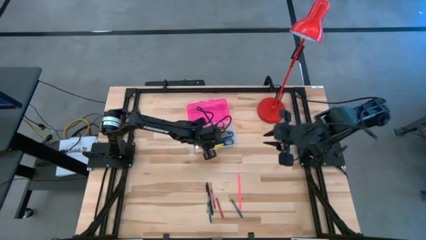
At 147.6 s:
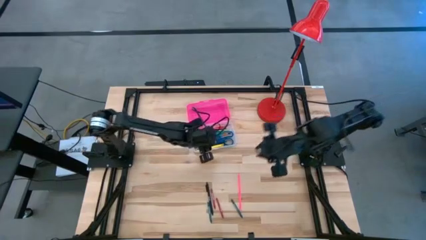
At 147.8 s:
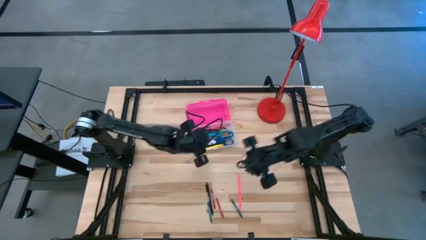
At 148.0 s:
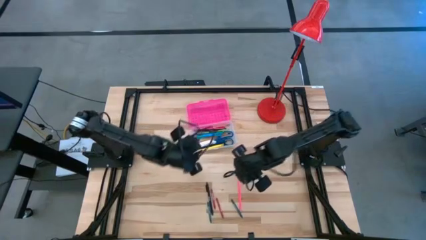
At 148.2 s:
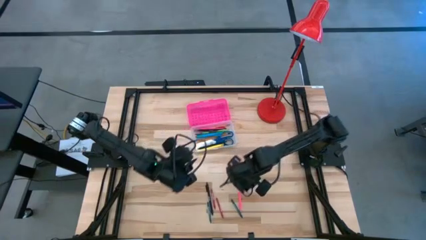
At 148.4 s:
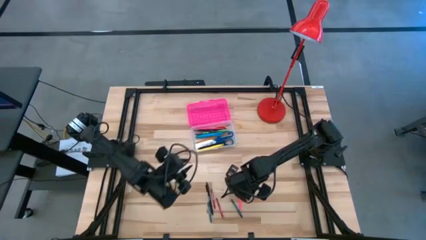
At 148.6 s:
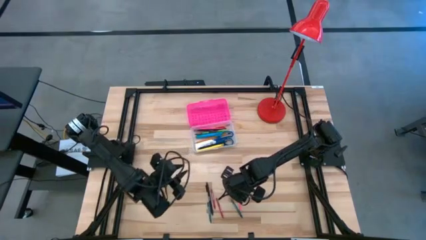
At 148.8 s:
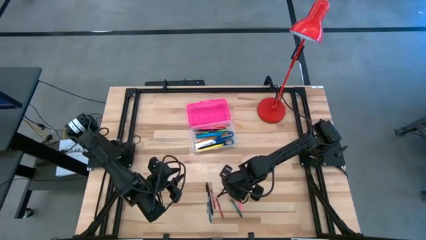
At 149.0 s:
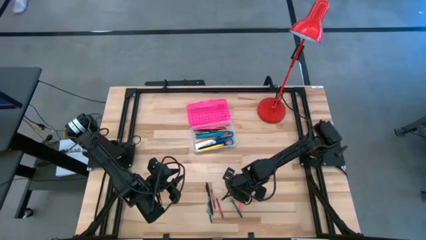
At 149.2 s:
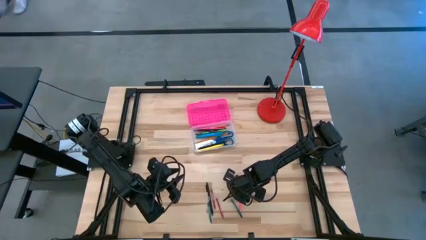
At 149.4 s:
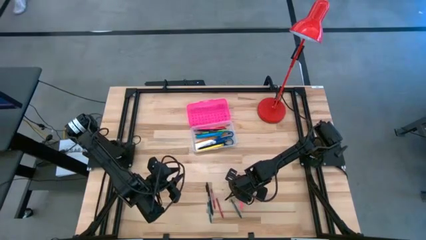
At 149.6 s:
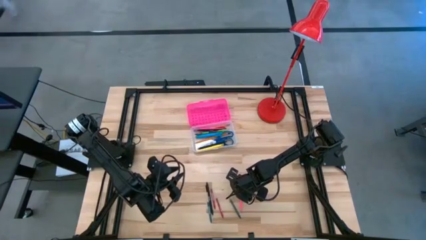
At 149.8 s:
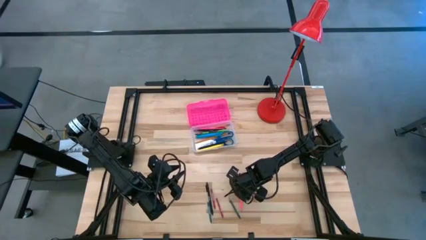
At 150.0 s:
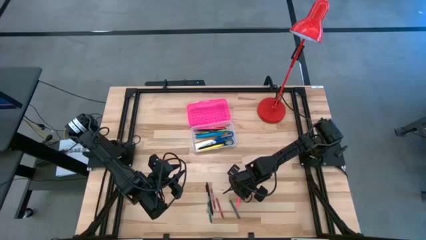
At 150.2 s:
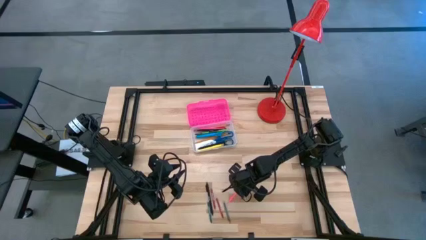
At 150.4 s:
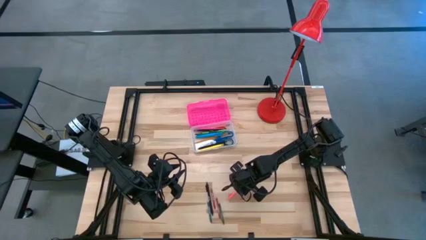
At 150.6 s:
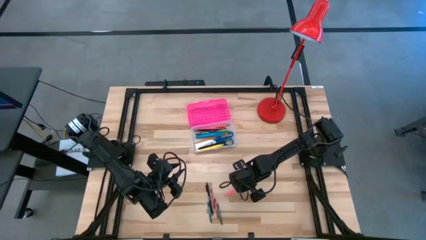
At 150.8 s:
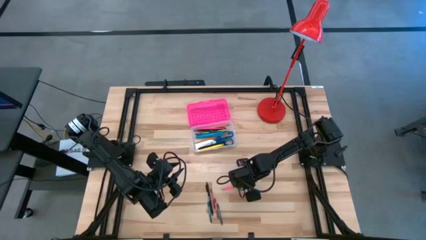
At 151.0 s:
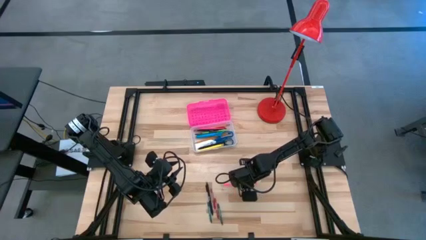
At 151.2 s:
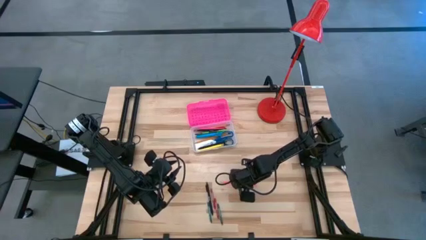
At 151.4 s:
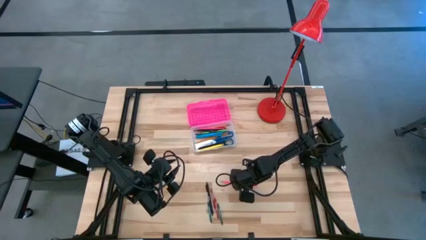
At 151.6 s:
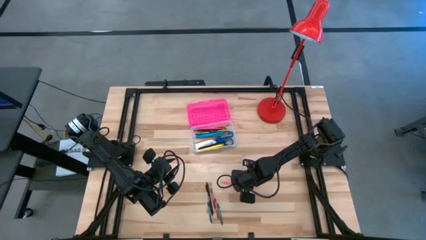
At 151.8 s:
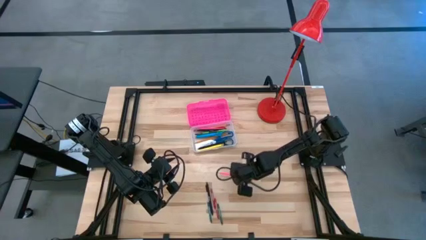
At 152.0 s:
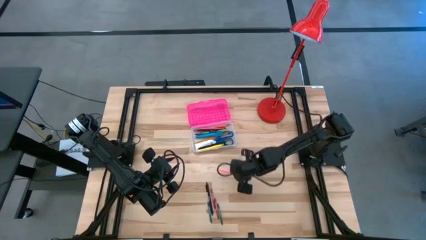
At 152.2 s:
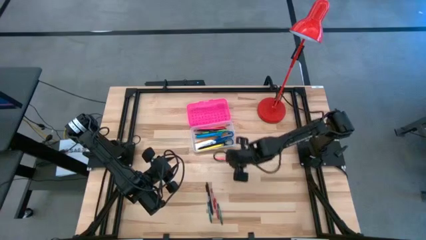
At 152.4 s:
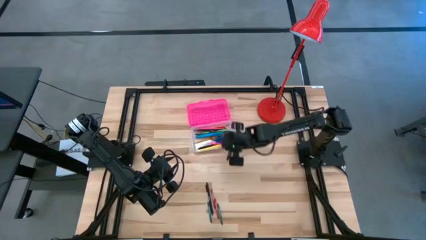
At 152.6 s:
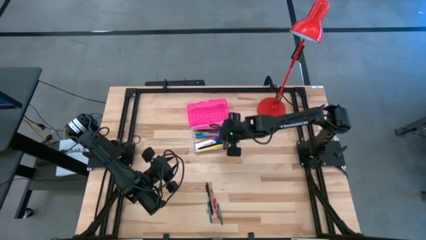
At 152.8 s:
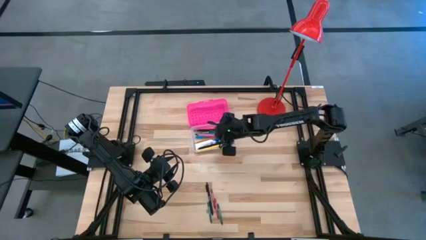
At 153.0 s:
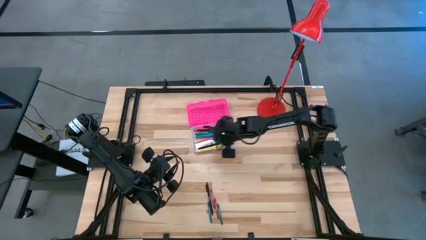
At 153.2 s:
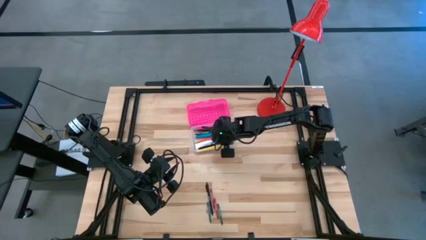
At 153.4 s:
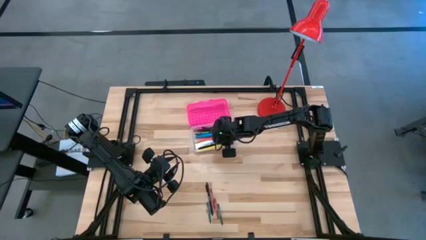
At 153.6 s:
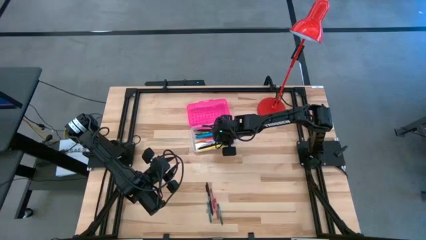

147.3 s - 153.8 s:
Task: Pick & place school supplies into a supply box
Put the pink pencil into the pink supply box

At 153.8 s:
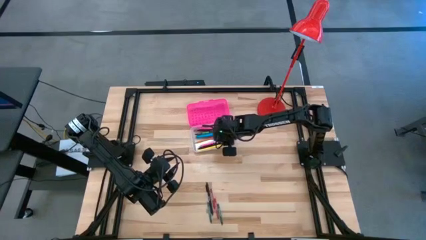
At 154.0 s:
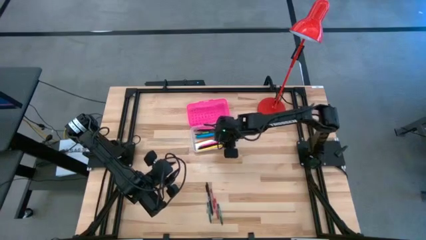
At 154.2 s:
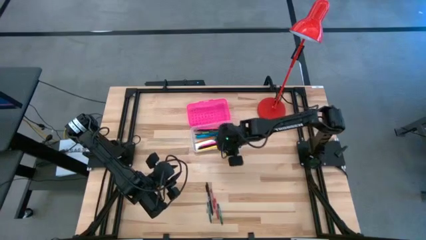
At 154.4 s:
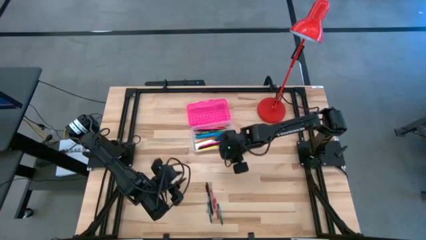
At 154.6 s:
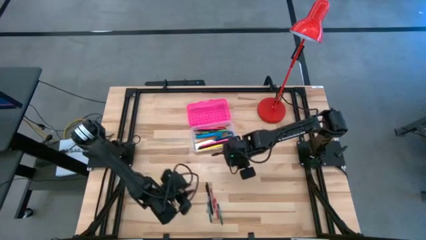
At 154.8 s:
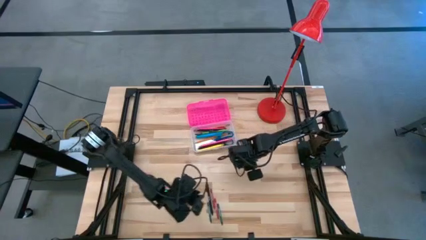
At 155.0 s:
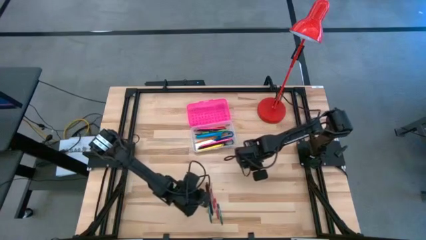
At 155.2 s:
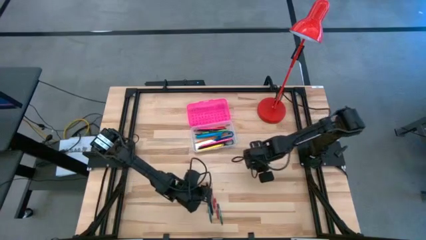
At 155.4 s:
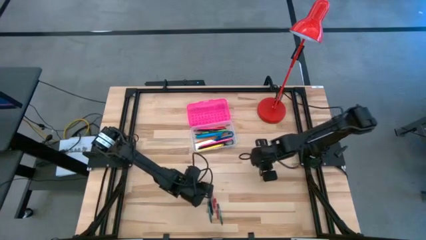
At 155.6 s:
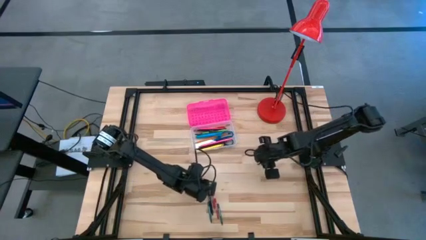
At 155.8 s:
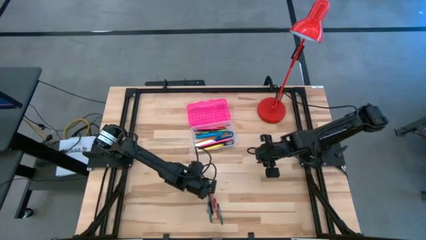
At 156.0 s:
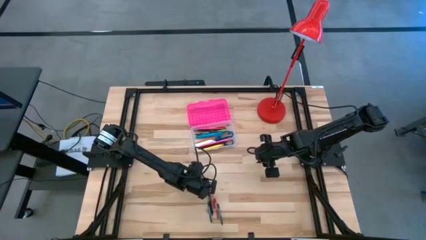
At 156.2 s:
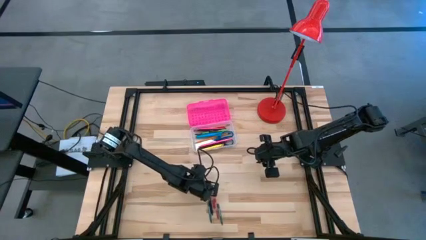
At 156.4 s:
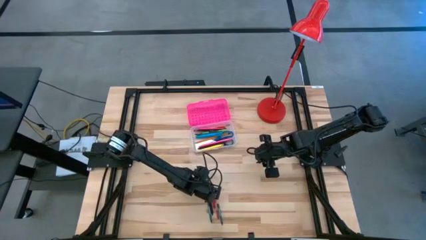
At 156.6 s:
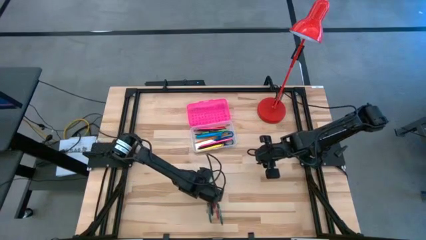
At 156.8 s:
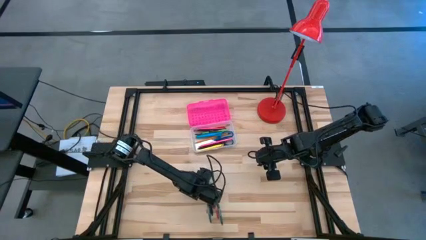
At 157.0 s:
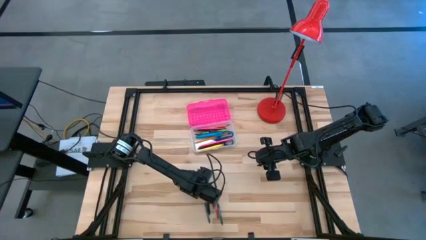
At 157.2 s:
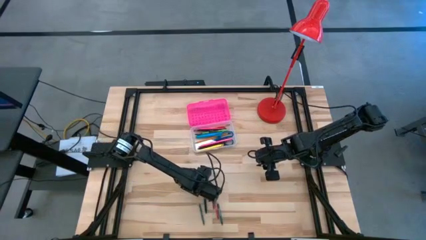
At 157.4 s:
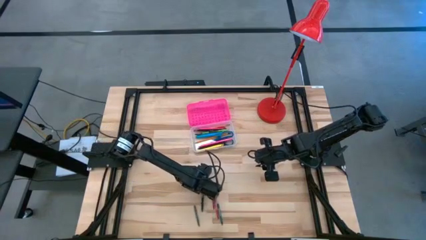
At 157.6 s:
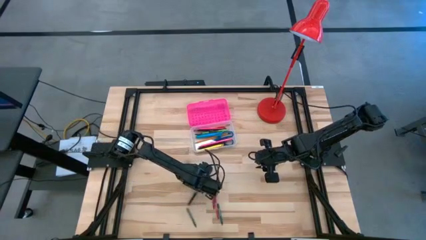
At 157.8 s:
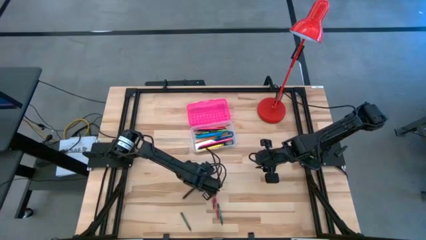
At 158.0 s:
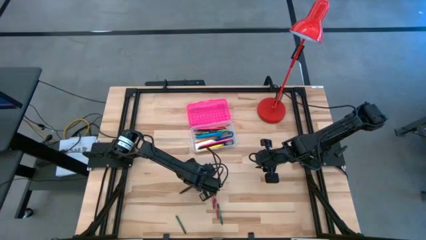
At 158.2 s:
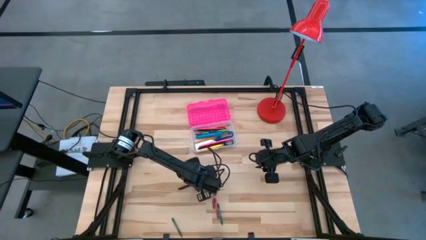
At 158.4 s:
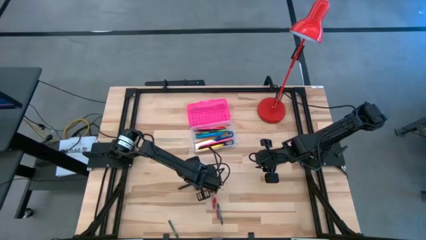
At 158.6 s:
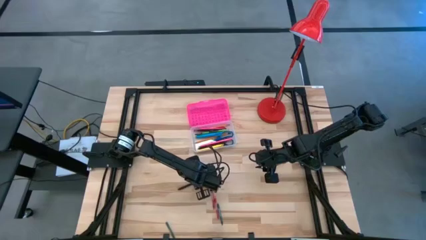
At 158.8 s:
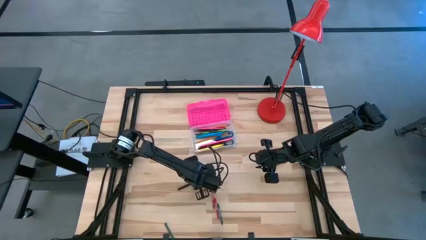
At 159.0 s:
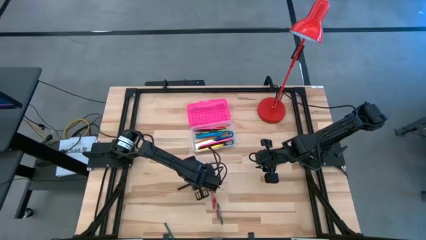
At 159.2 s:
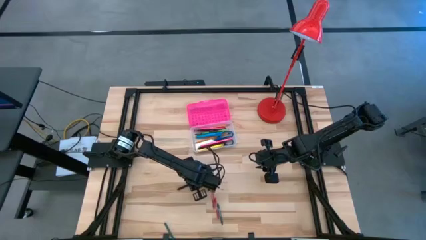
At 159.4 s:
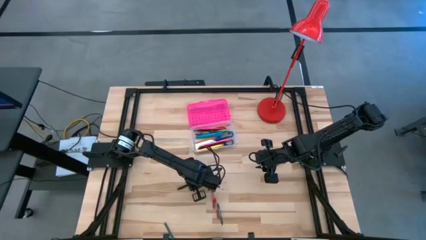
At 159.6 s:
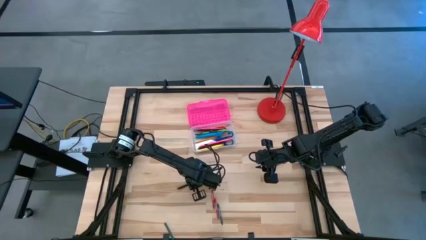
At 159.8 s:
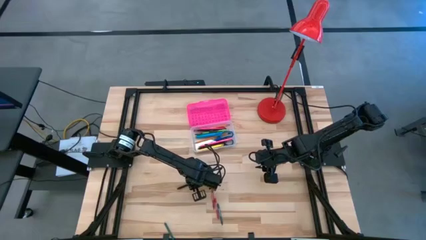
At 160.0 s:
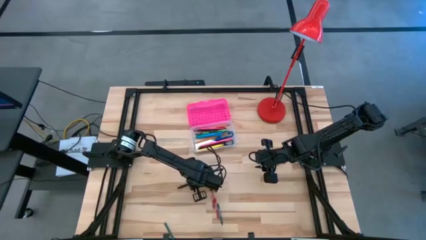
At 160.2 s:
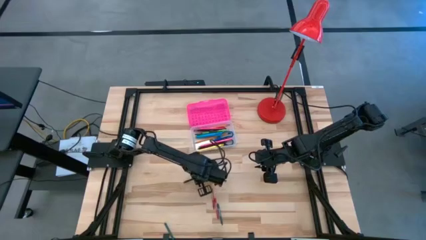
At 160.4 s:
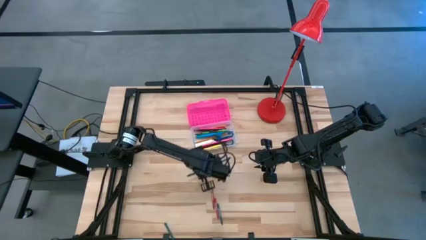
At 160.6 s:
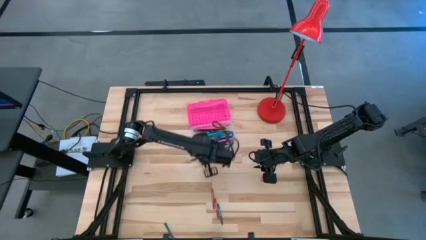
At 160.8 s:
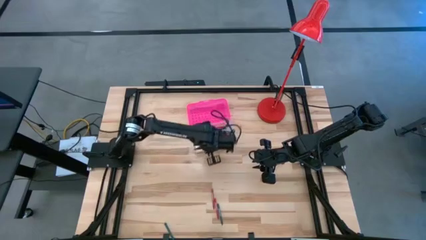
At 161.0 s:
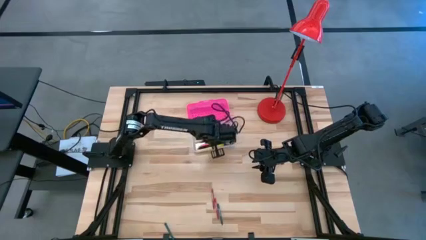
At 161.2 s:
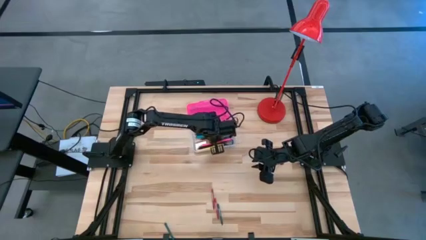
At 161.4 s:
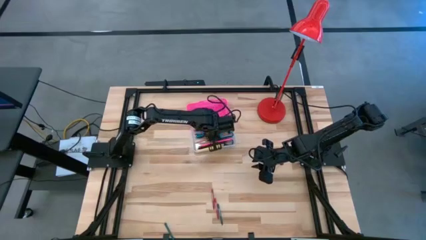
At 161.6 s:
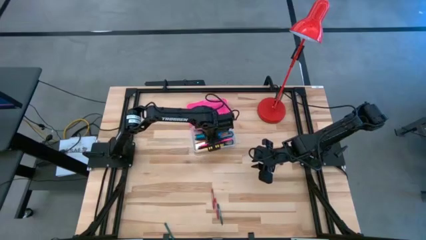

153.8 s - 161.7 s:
Put the black pen into the pink supply box

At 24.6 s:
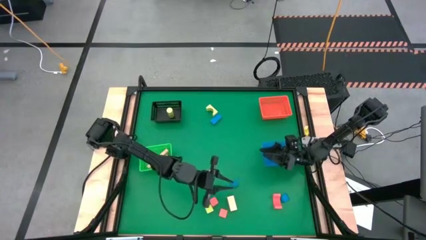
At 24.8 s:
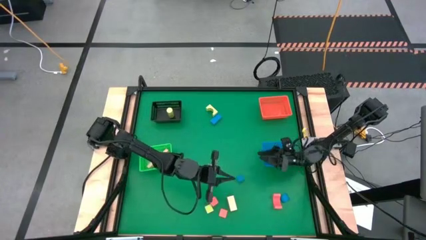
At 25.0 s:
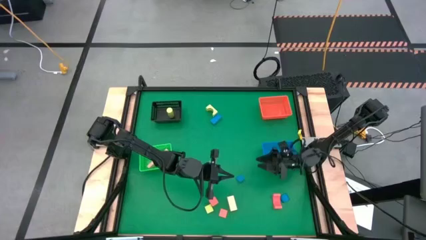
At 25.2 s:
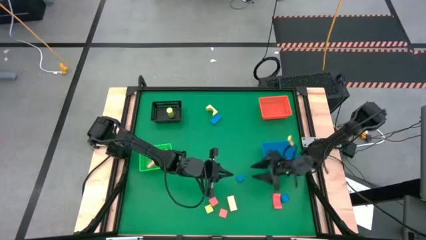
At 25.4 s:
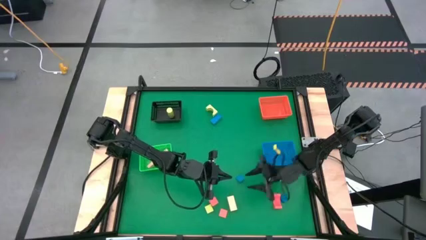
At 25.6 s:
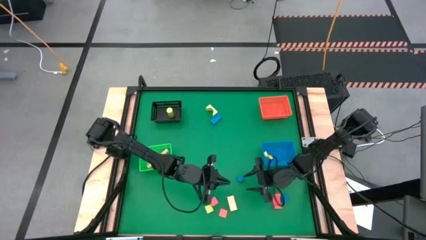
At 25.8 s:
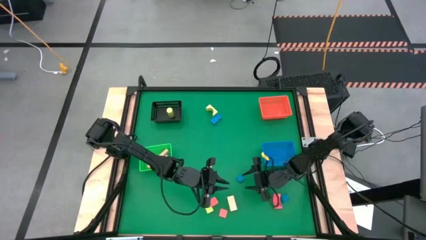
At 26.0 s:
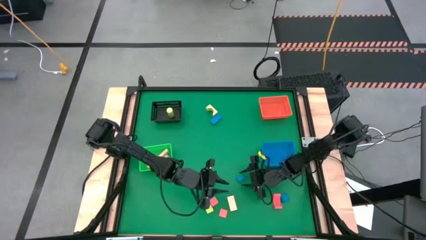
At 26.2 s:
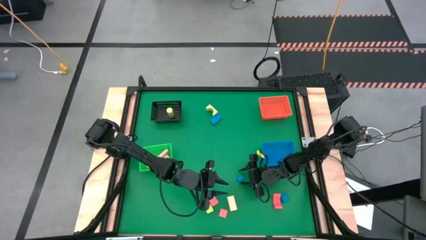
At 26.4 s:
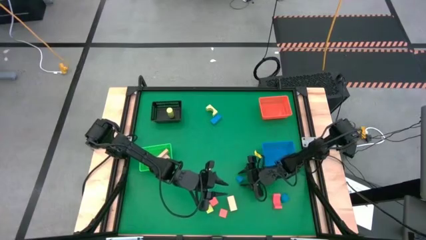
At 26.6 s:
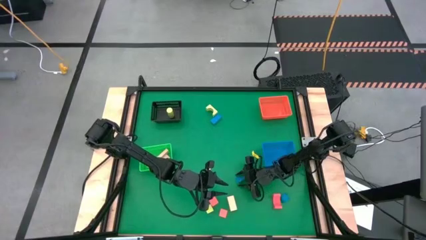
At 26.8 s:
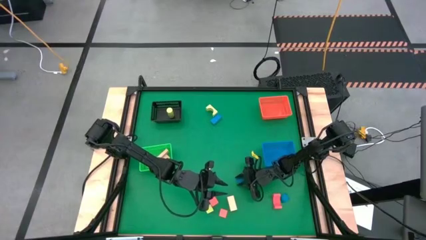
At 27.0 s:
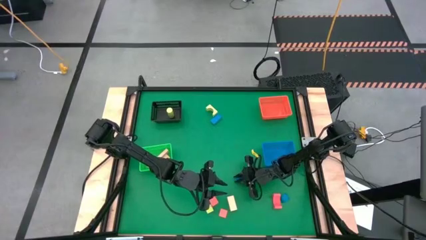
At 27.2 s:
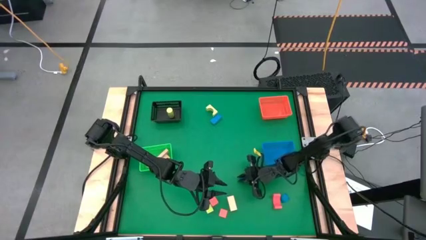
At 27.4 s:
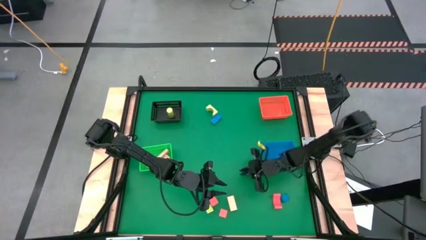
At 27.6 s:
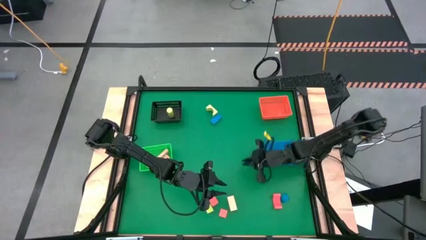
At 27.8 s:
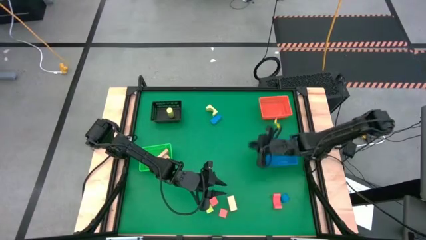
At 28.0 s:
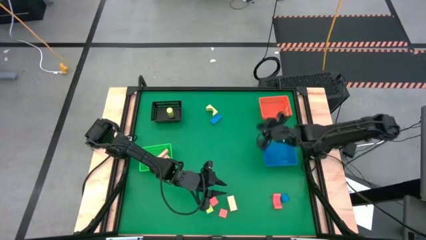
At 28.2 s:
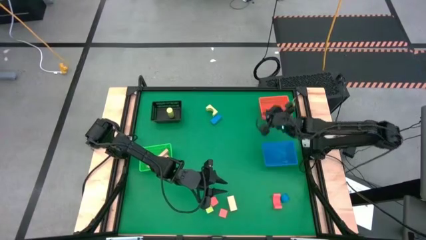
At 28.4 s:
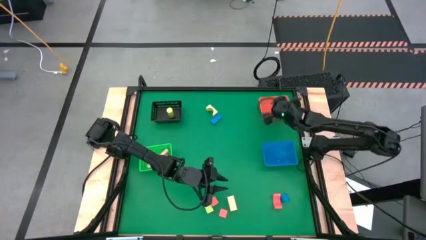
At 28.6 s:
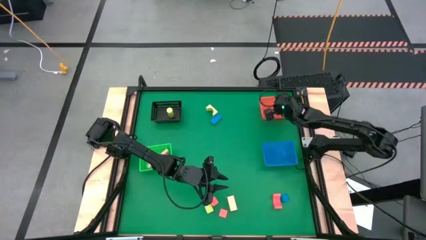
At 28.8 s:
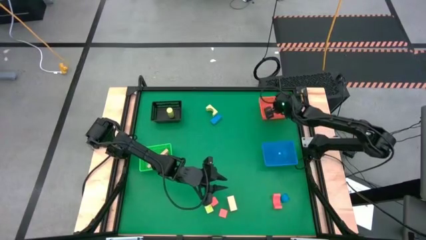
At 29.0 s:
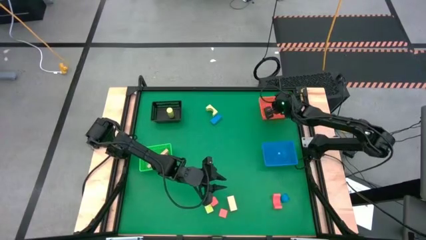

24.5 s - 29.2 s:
Task: Sort & place blocks by color
Put the blue block into the orange bin
